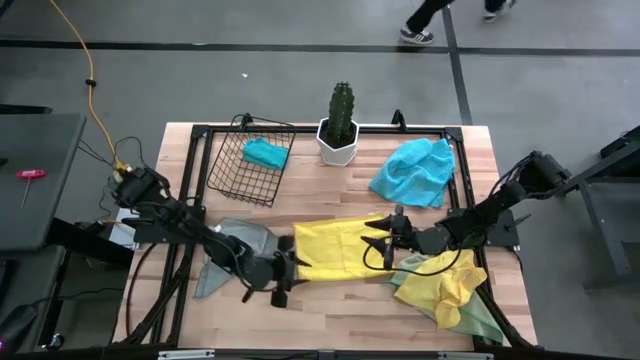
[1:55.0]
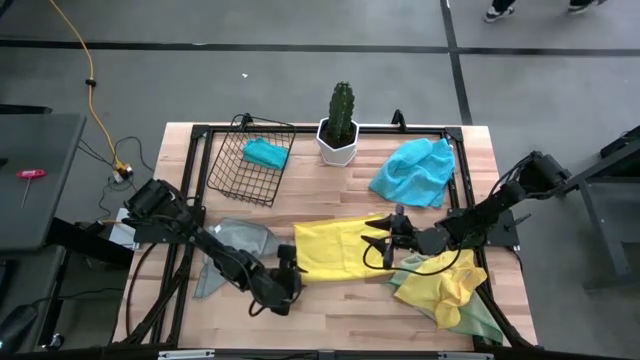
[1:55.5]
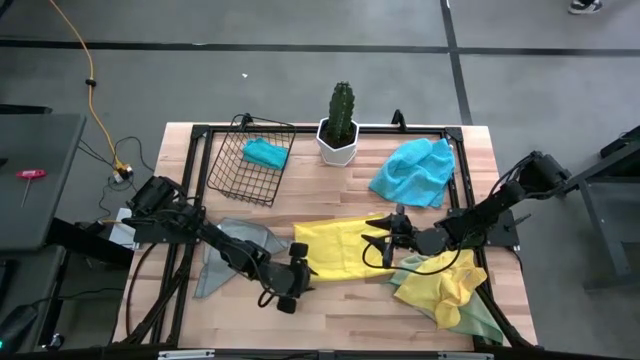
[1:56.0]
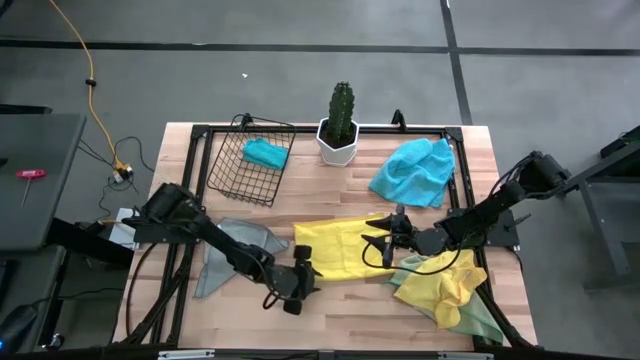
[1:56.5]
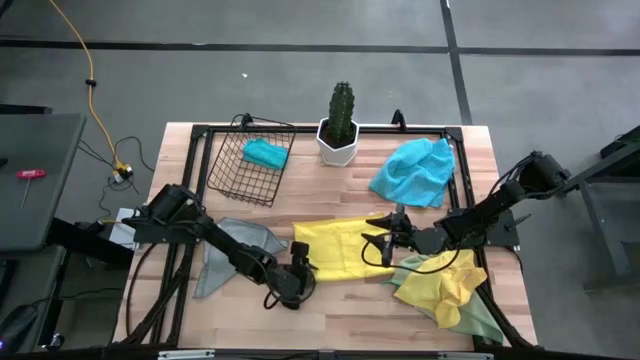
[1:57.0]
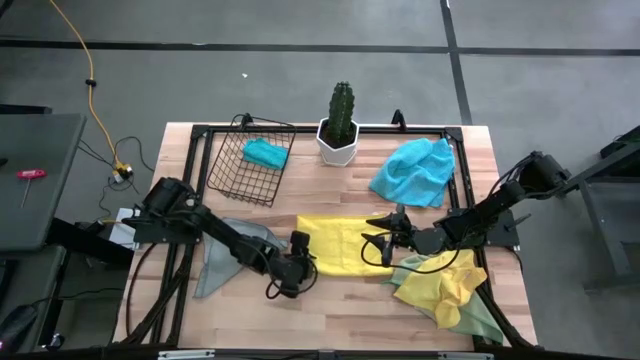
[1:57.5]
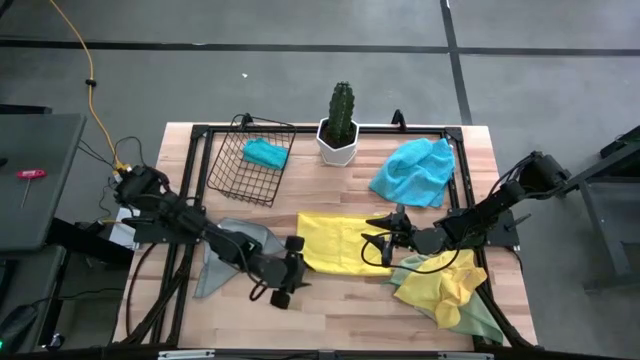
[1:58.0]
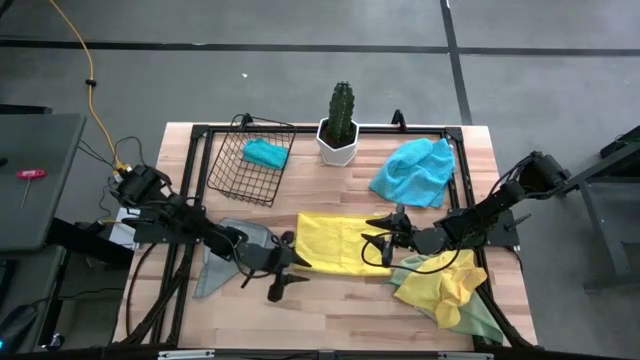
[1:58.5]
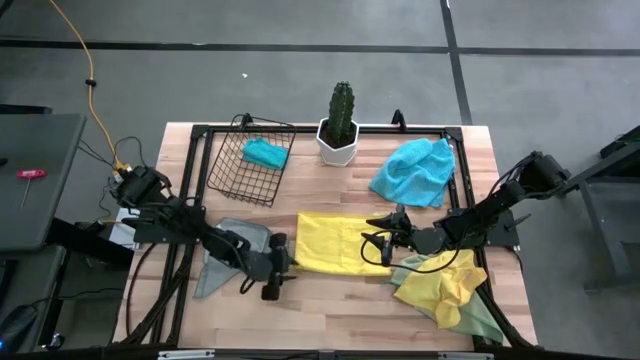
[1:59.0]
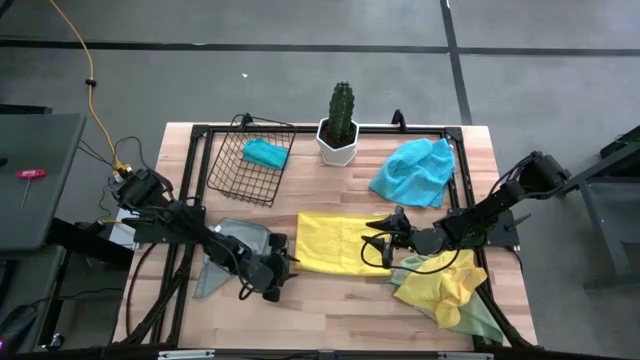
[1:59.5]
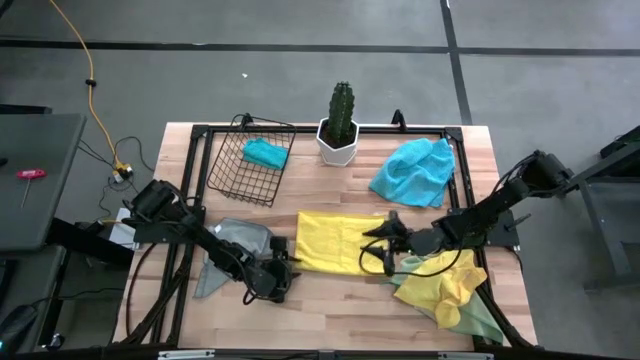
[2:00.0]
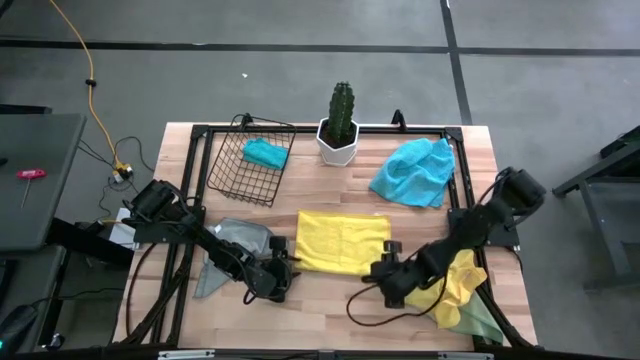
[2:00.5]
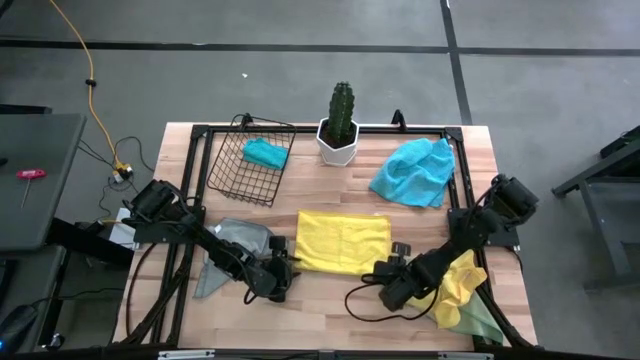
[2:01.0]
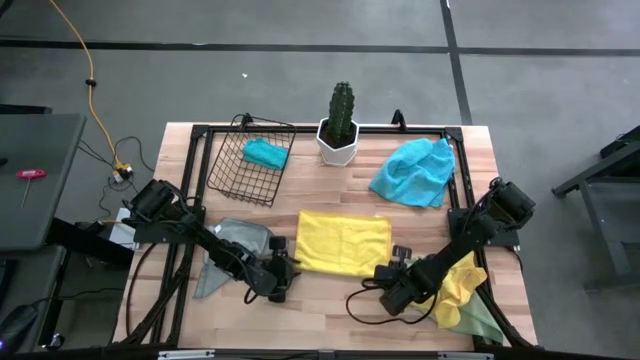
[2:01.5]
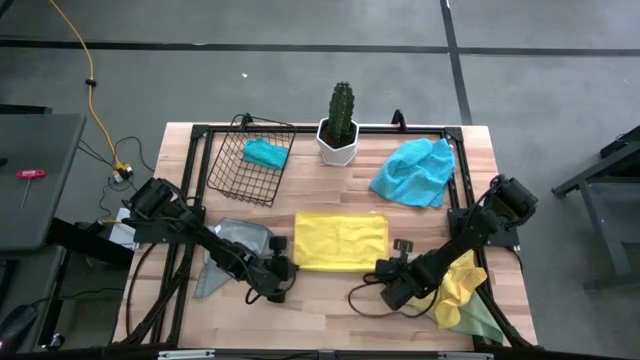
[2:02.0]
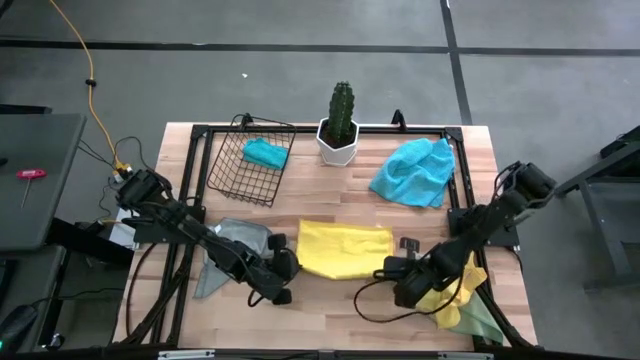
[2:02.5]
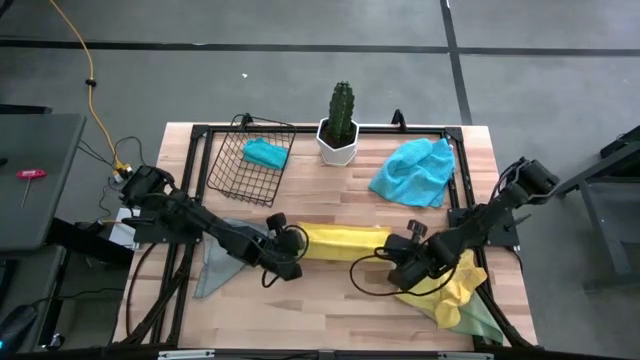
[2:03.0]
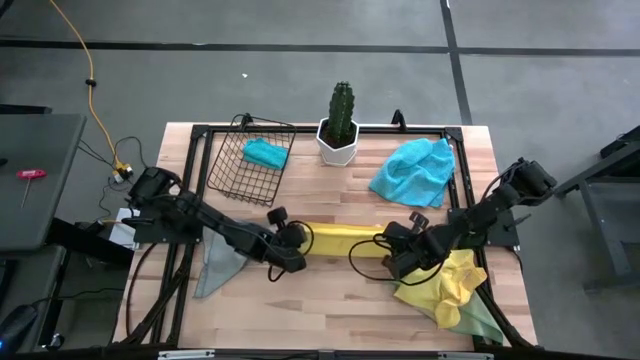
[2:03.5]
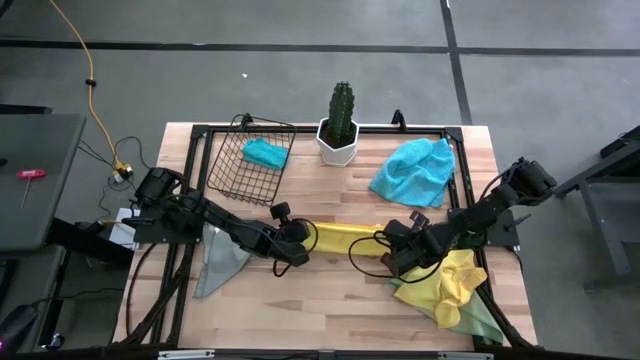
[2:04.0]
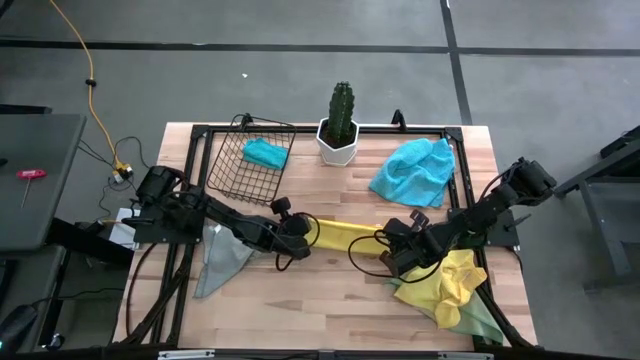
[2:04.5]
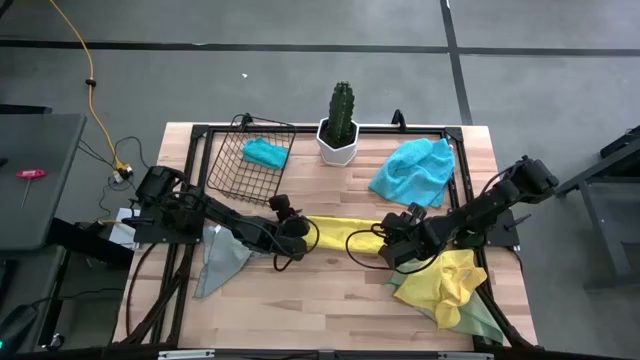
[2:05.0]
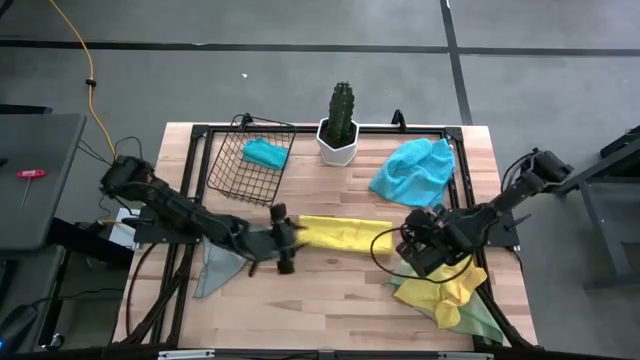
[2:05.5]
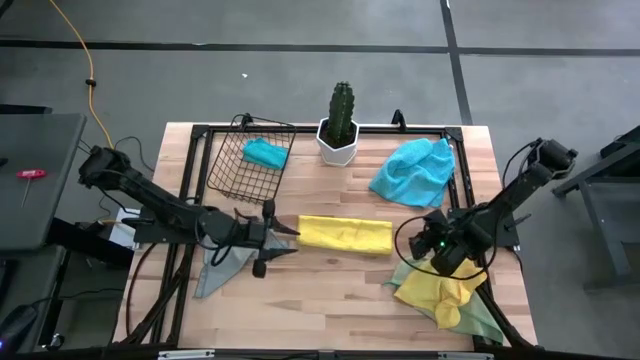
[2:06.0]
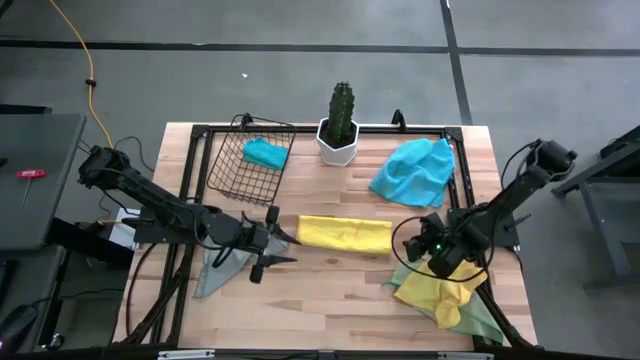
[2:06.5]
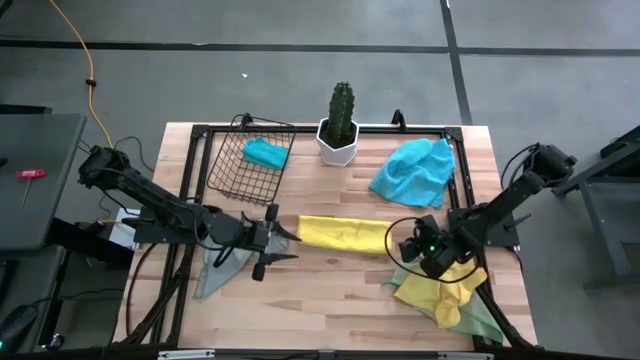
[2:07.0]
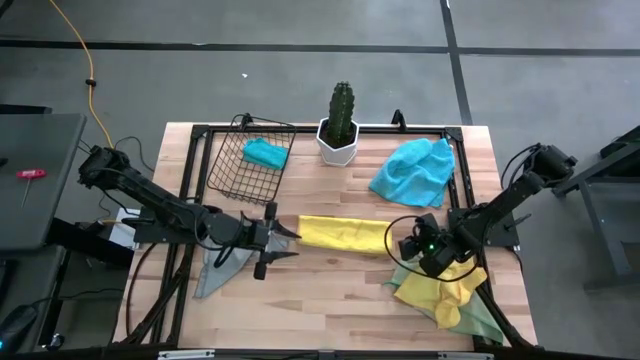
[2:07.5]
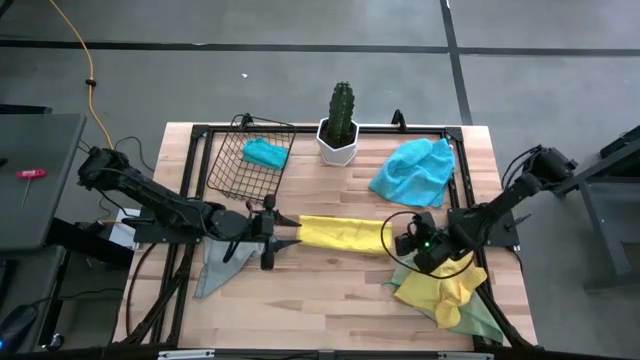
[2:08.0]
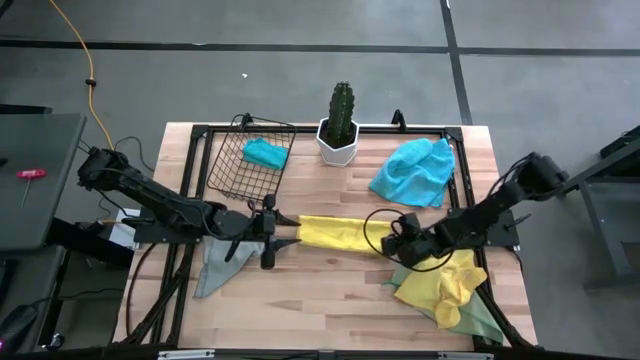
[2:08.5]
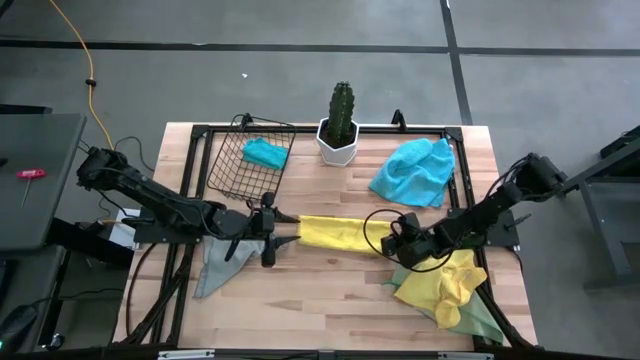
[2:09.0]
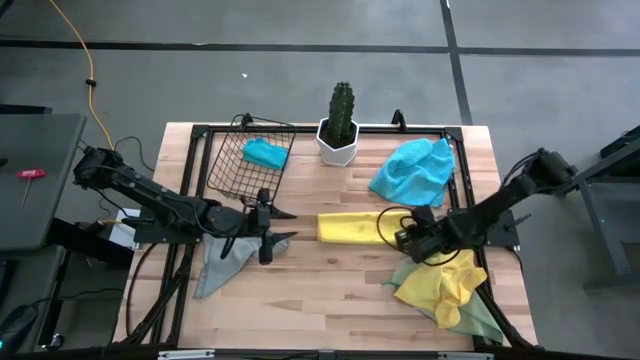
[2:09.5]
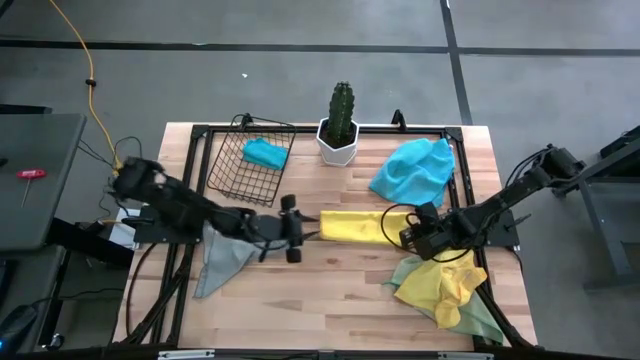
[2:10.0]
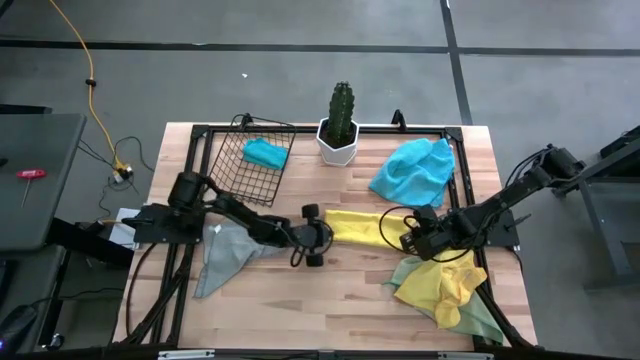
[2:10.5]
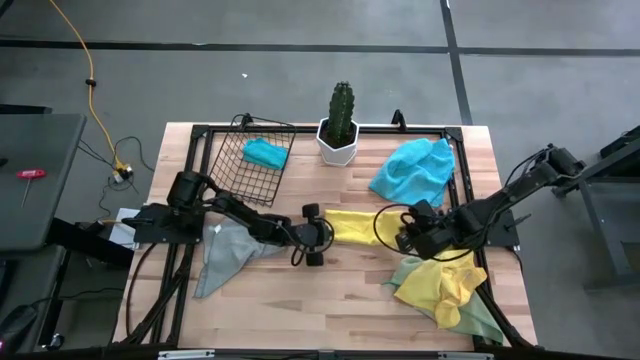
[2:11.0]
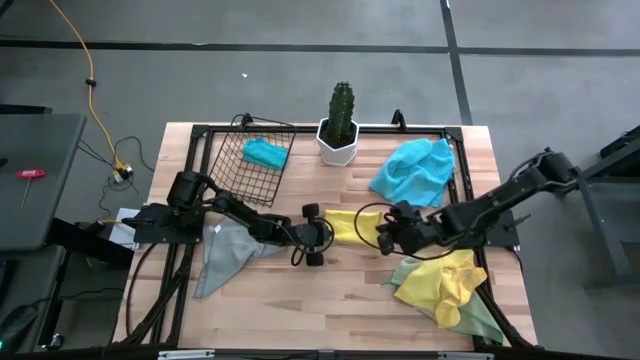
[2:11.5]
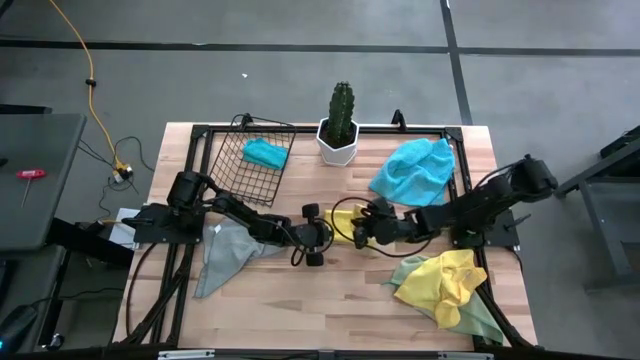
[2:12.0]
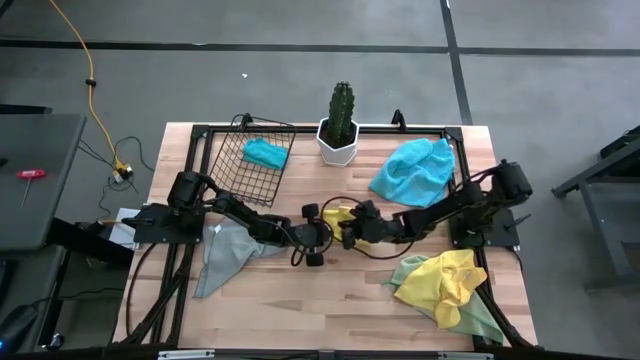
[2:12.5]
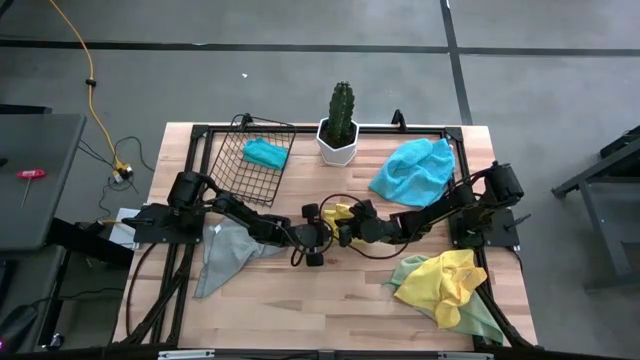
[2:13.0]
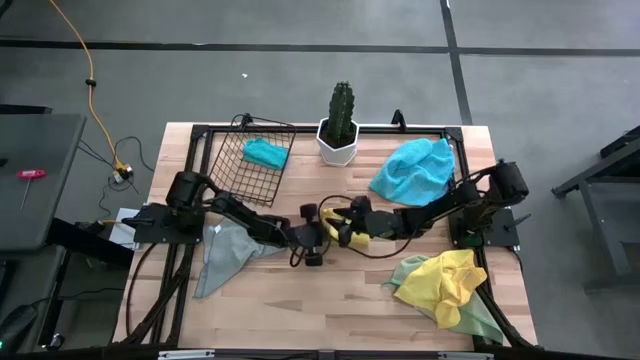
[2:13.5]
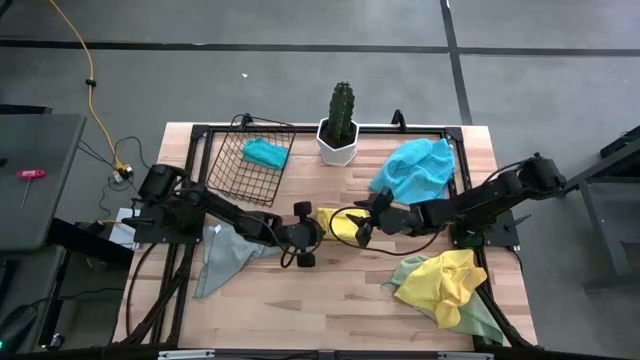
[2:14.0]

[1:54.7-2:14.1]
Task: Fold microfiber towels
Fold the left yellow microfiber towel on the table

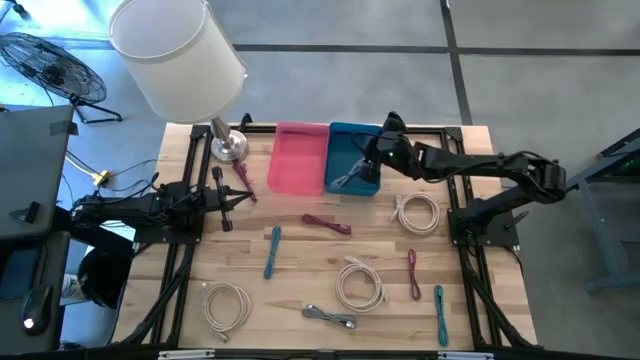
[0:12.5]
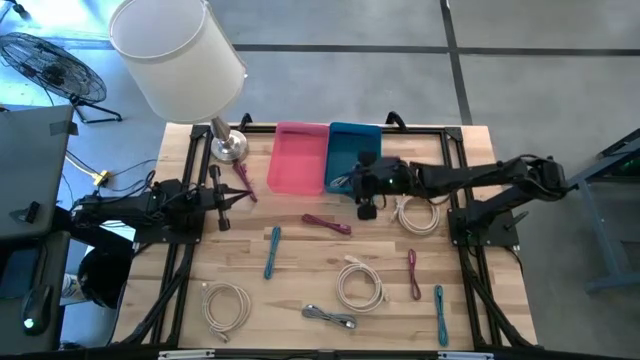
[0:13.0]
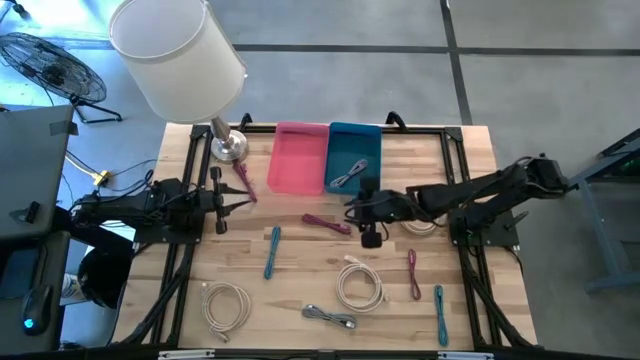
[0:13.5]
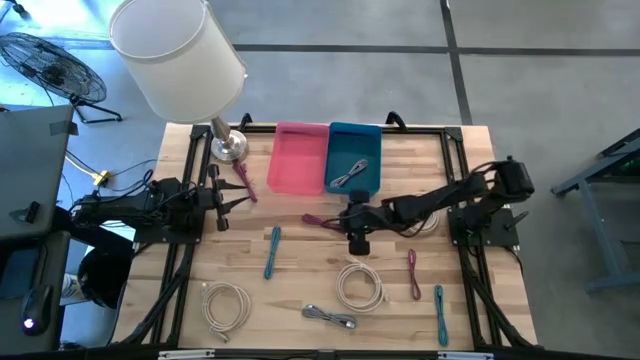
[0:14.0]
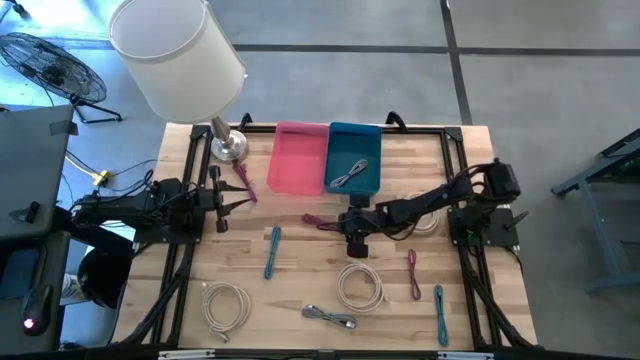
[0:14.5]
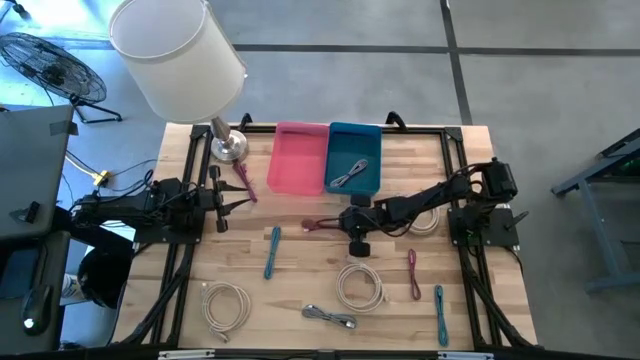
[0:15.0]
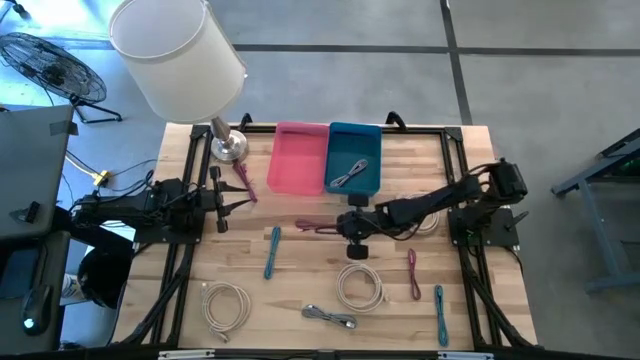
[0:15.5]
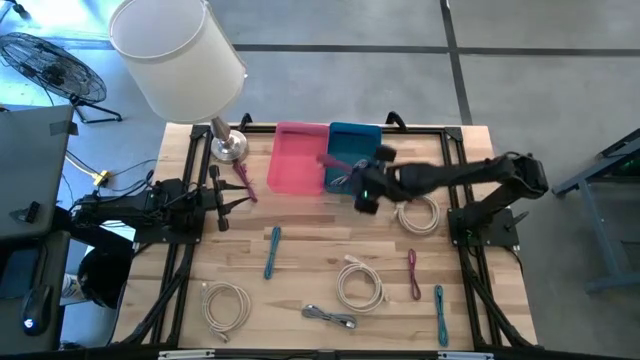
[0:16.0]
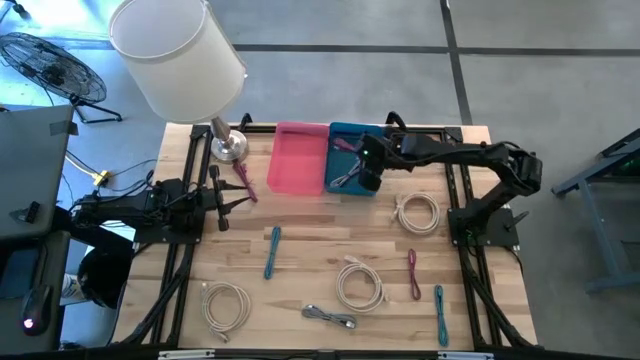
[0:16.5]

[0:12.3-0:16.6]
Task: Pick & Place USB Port
Put the middle pink charger cable into the blue bin
